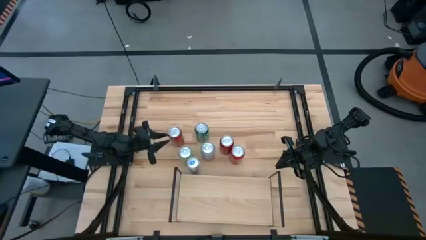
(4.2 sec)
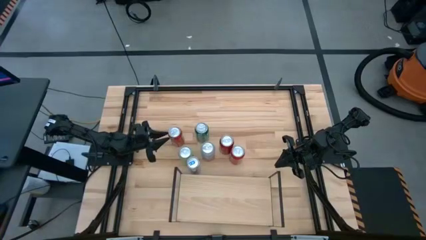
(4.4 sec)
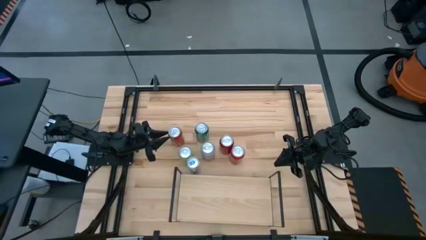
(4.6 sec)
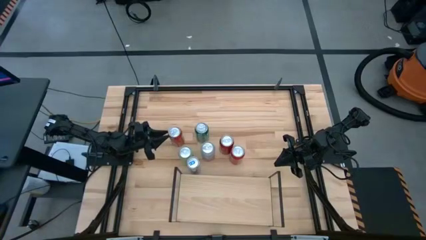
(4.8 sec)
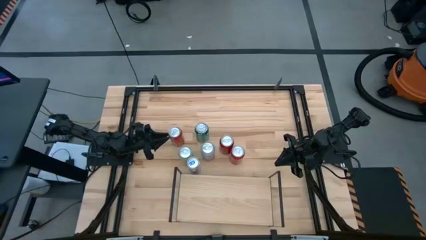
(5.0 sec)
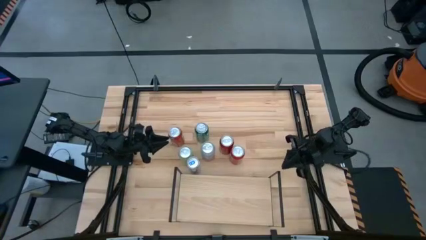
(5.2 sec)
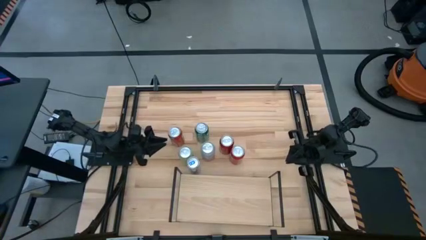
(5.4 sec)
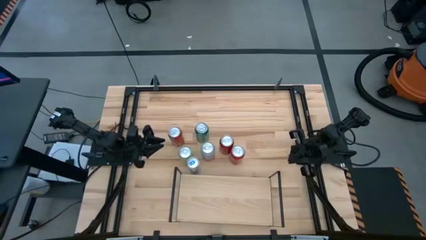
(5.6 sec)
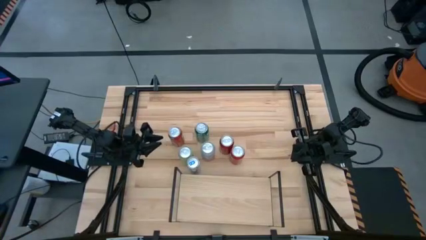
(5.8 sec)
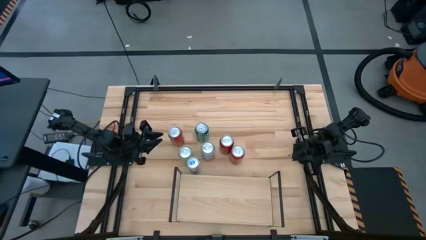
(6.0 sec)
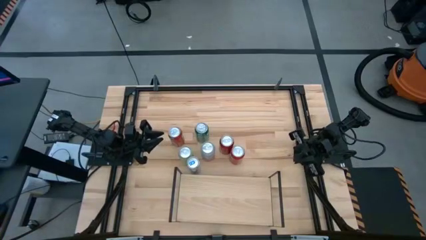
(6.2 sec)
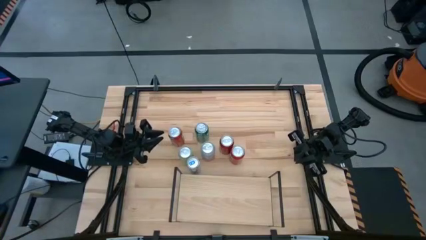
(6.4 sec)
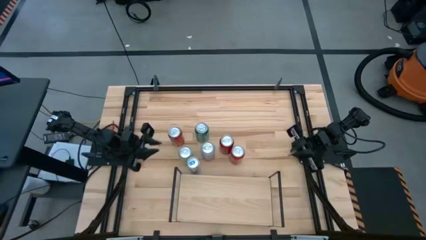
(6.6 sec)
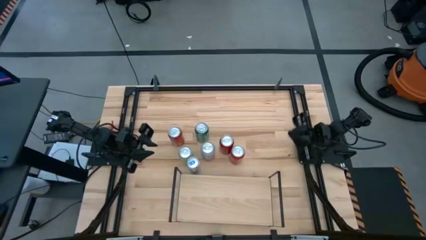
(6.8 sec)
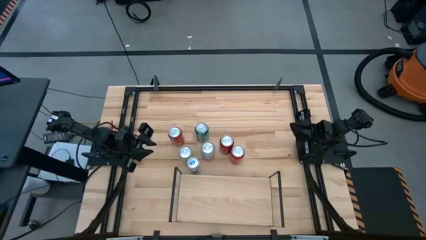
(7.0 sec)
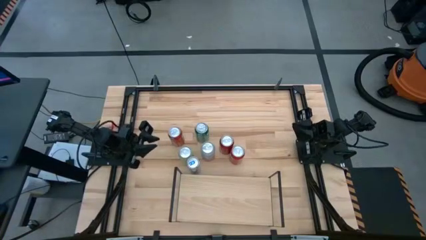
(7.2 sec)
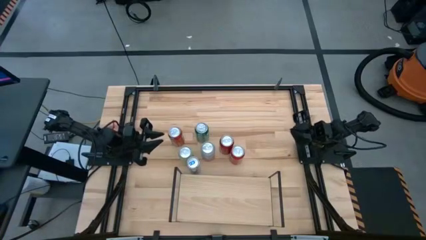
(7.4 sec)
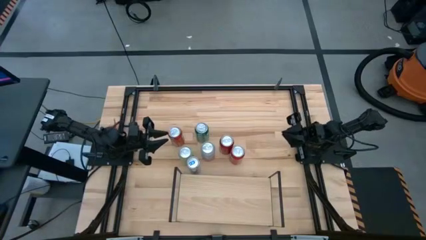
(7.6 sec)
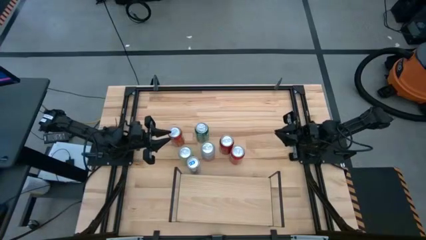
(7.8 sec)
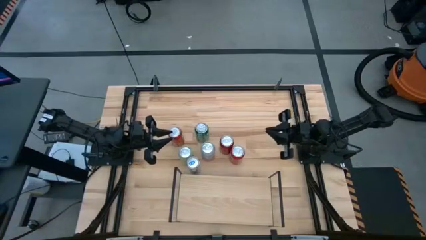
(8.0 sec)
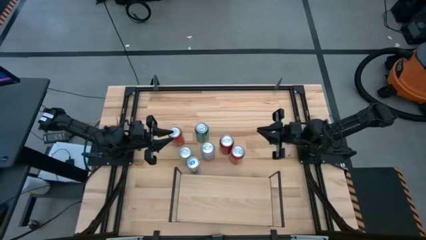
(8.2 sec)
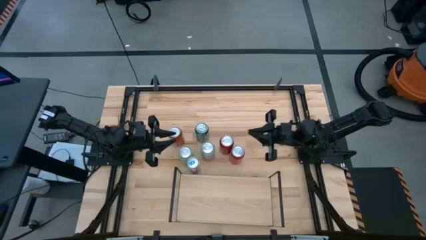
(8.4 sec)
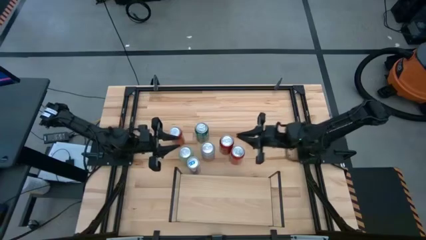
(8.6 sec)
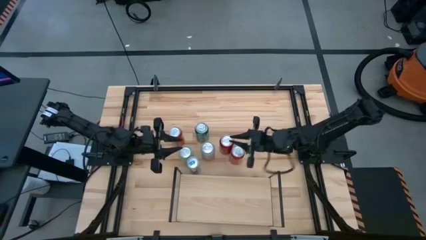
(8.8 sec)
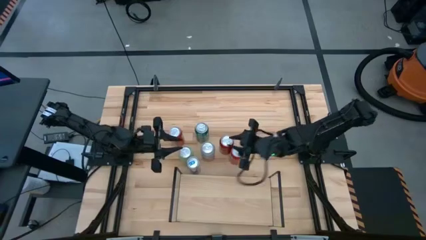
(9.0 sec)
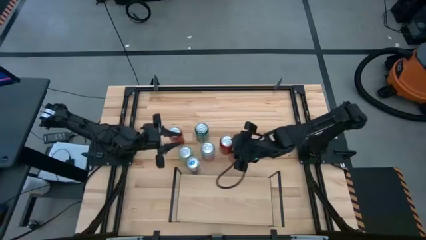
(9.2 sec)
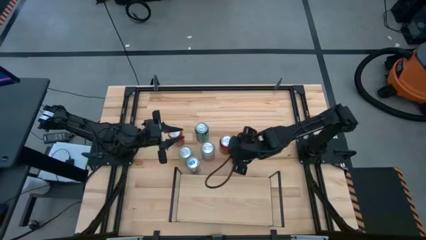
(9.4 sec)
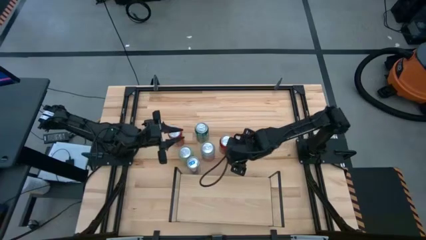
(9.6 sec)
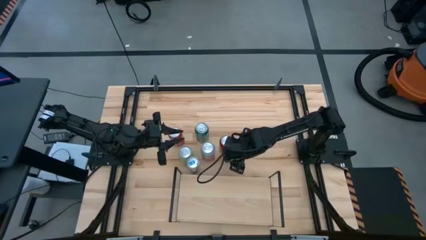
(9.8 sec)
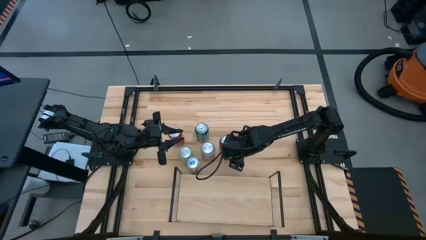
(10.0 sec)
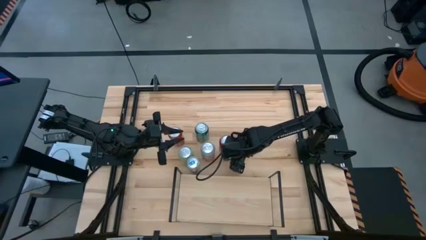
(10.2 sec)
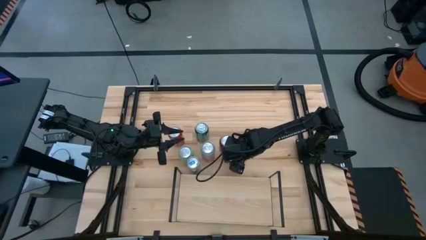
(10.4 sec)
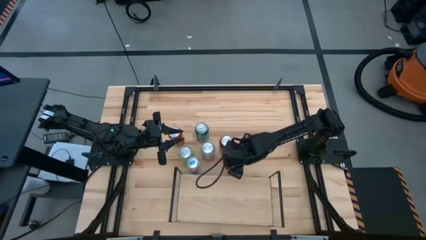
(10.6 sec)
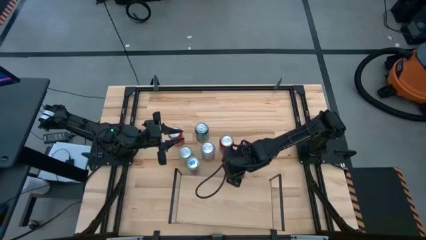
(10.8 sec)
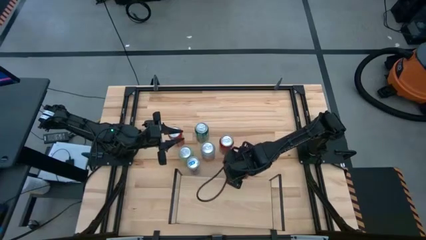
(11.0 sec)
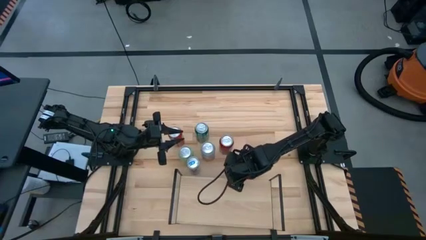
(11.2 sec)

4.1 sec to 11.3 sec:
Task: Place canned beverage on shelf
Put the right orange soda can on the shelf

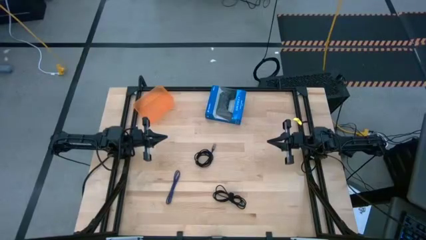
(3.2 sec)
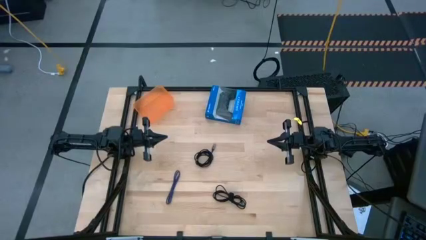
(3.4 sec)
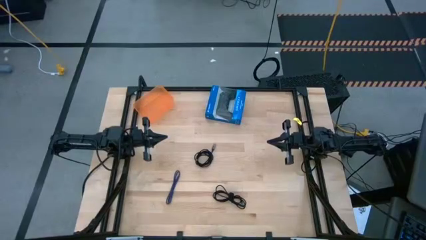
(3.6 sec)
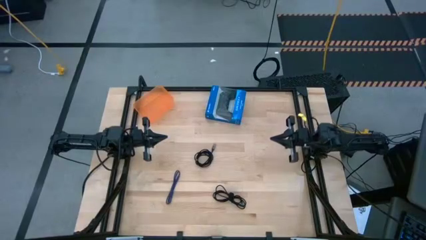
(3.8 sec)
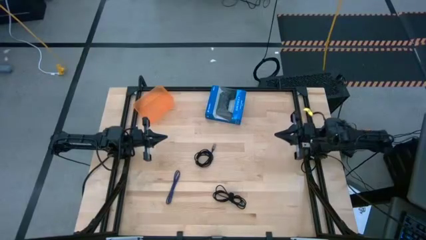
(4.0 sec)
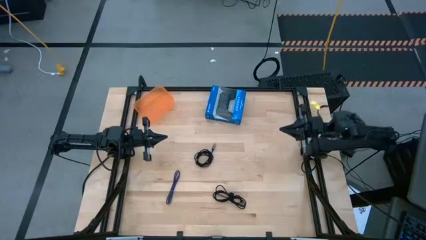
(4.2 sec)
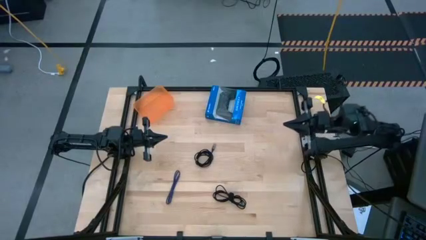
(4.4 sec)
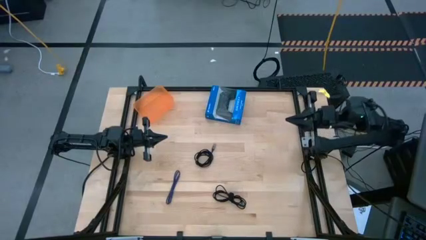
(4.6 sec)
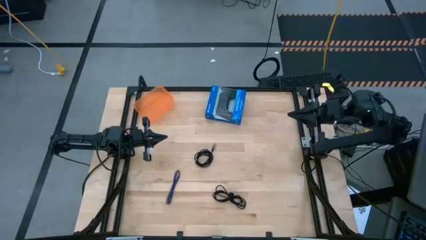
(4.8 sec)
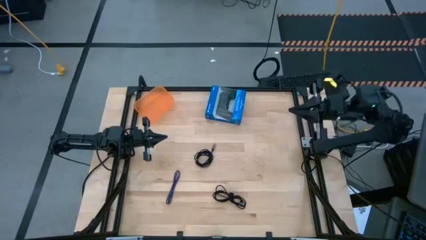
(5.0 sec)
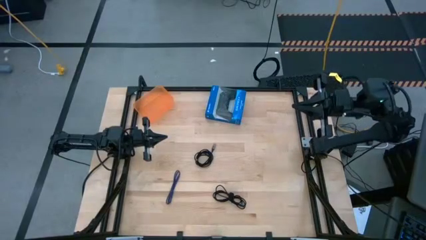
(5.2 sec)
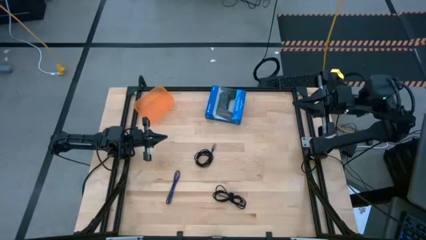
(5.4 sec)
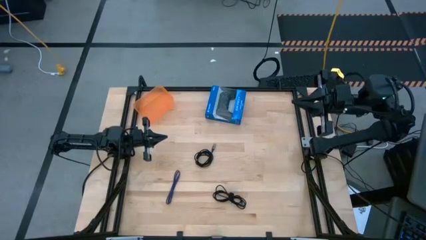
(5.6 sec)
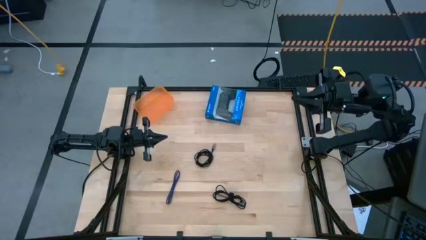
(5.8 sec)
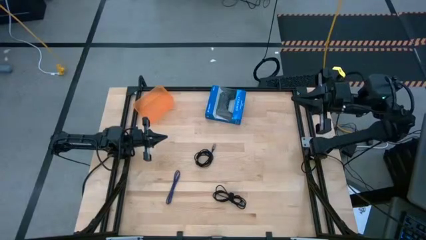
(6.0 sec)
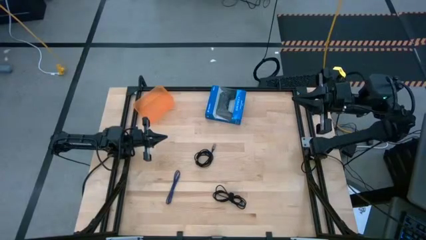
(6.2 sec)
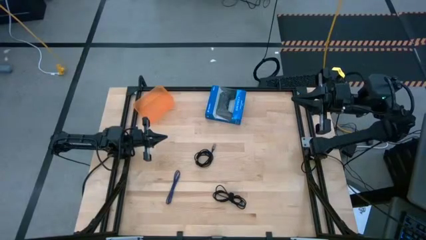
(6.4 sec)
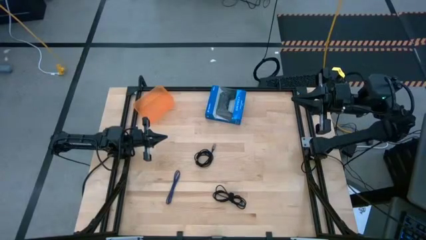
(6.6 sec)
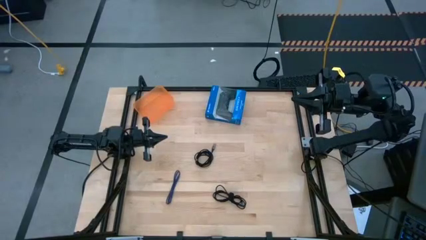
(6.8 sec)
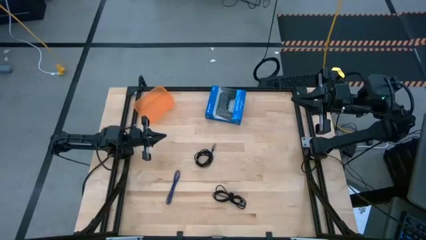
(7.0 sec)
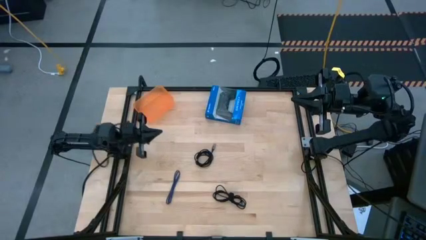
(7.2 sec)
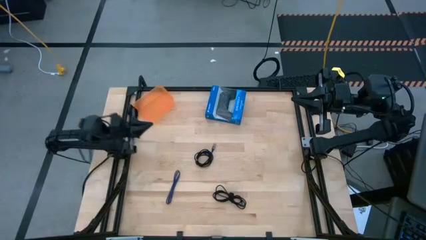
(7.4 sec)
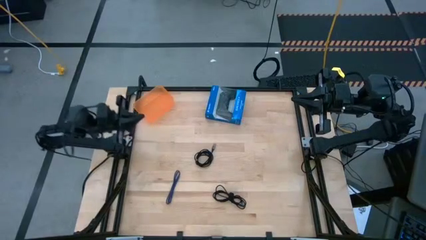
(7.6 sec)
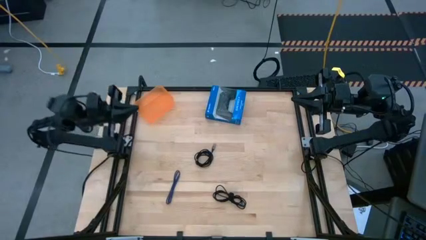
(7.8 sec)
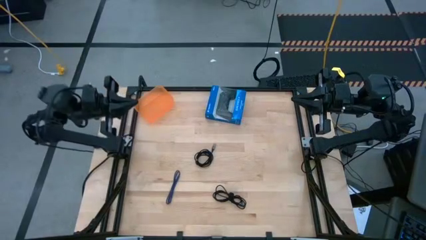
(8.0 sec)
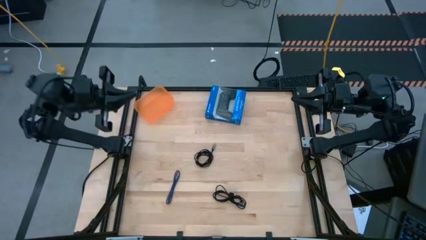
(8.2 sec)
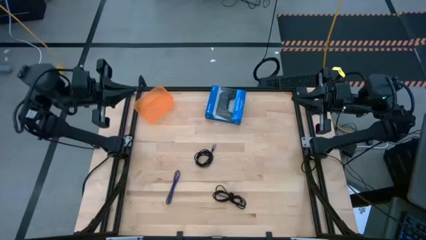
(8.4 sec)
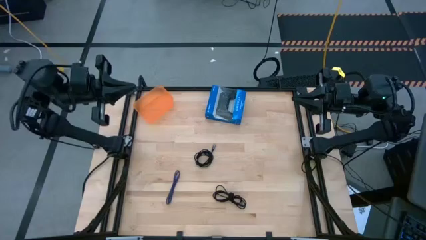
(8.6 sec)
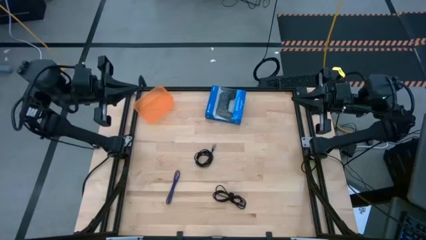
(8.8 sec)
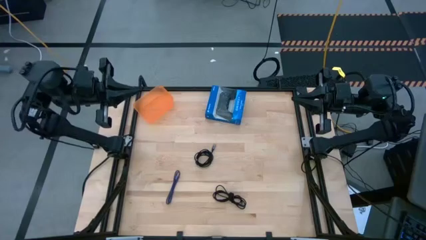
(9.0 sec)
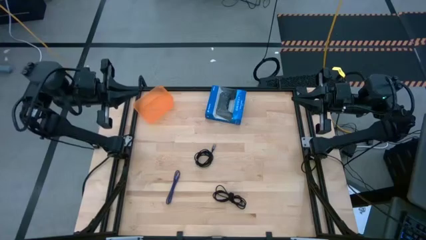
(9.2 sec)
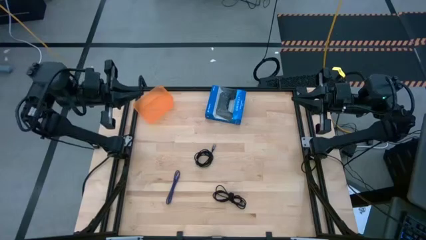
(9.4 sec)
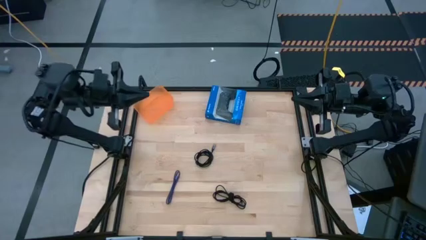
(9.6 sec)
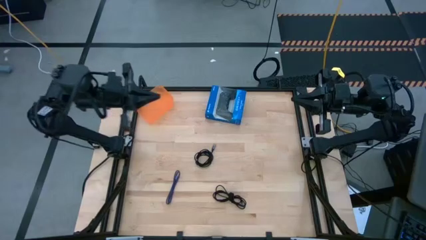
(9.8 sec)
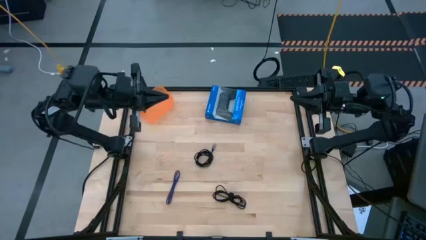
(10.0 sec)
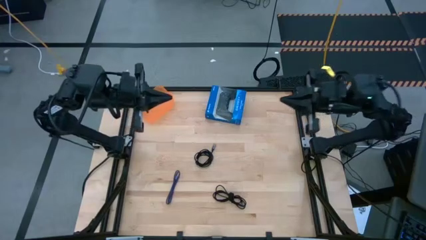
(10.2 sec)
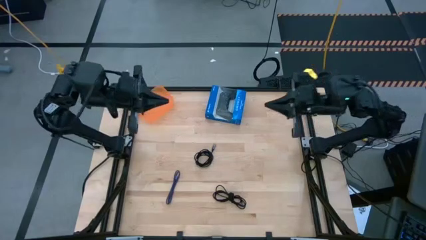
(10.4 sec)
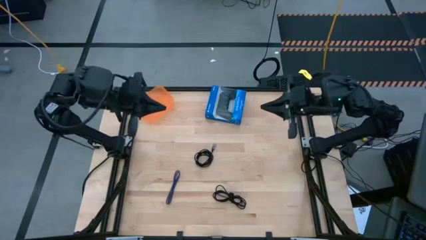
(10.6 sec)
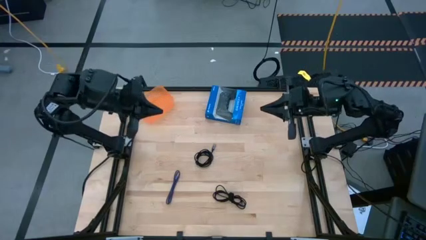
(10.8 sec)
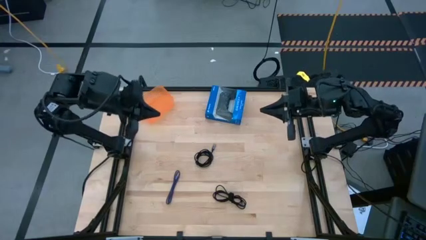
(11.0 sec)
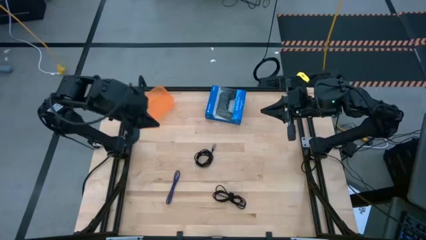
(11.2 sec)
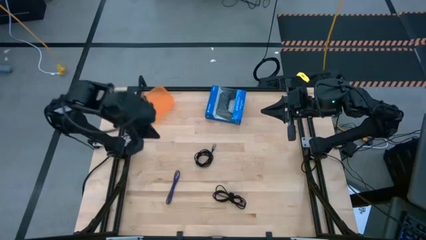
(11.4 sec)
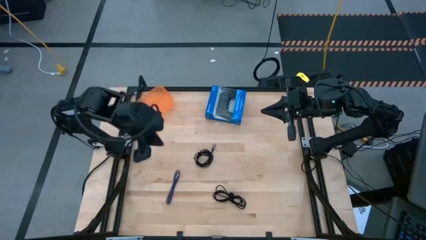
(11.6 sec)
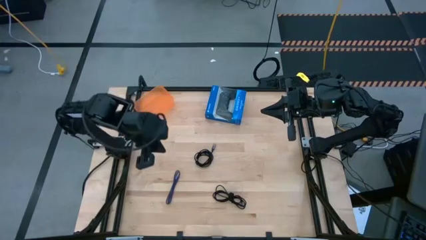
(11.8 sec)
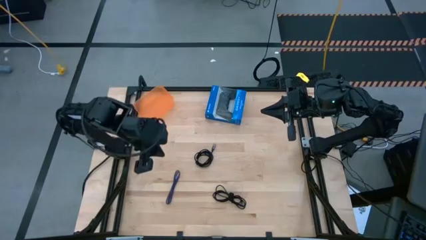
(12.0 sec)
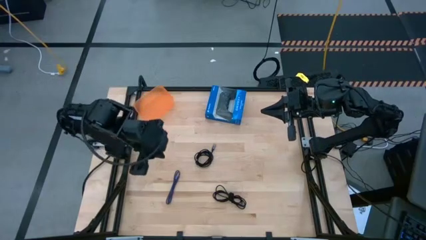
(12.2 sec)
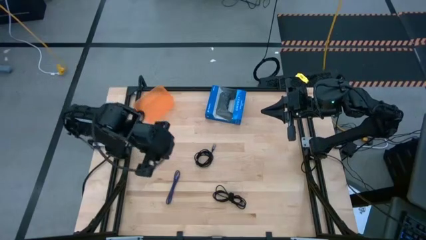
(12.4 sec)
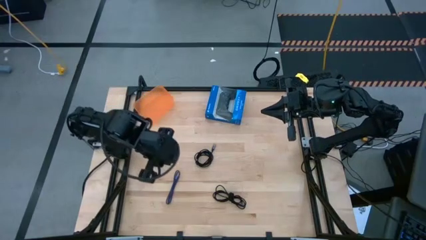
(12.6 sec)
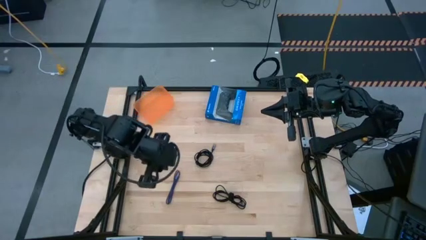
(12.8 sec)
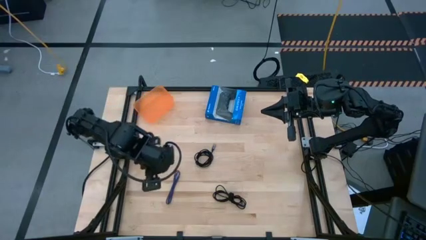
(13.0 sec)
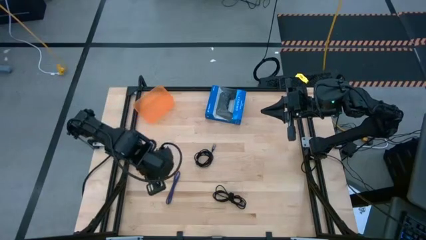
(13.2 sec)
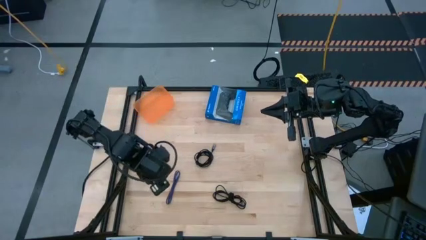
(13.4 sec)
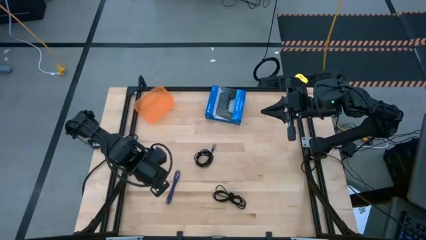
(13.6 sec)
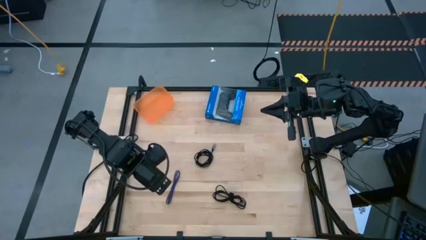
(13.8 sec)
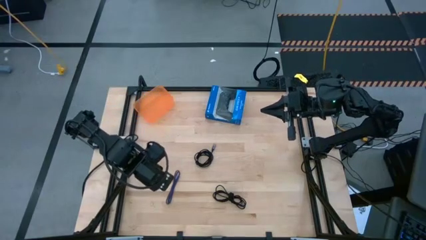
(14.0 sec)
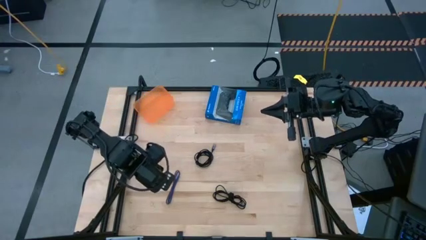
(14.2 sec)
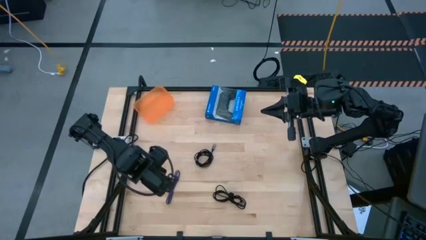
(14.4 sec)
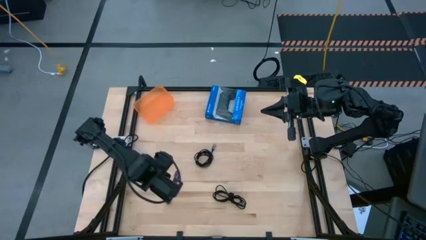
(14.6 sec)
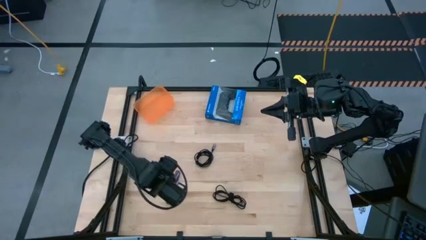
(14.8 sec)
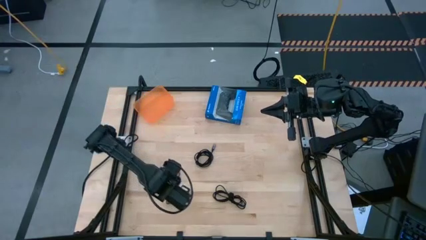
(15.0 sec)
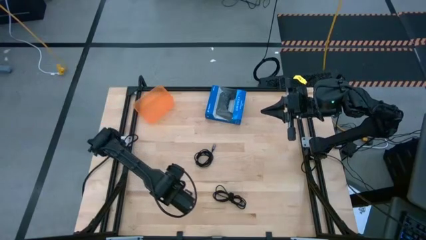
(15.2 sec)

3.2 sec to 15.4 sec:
Task: Pick and place USB-C Cables
Put the blue charger cable into the orange bin
